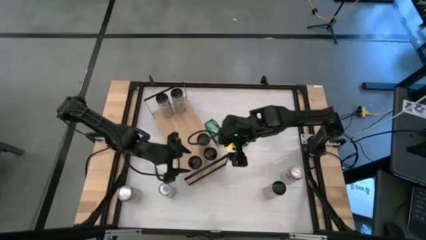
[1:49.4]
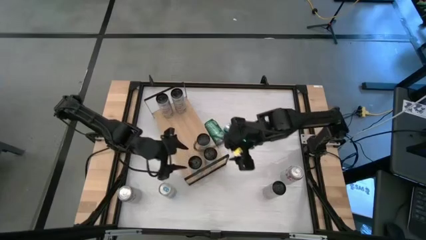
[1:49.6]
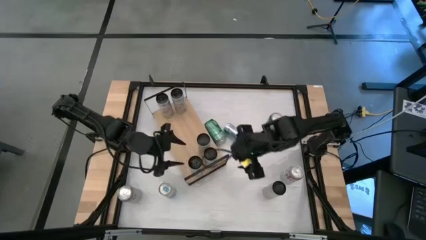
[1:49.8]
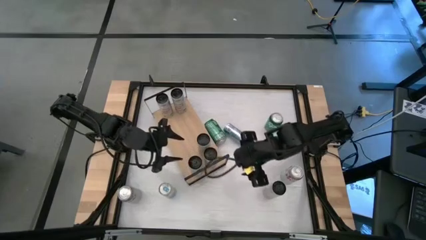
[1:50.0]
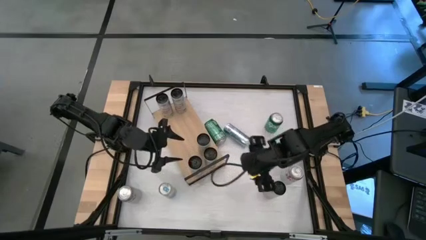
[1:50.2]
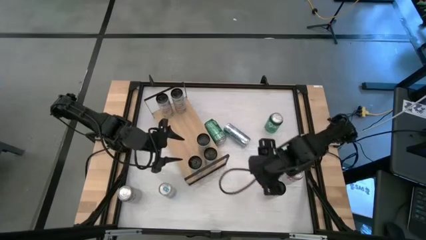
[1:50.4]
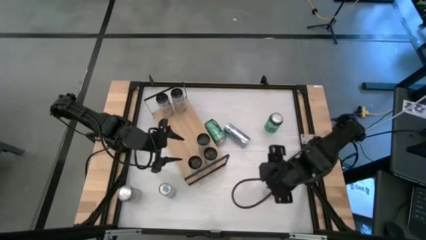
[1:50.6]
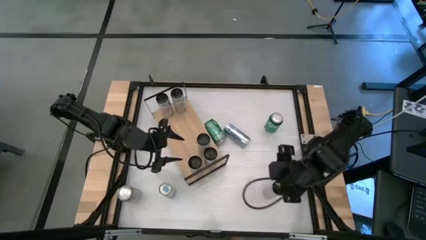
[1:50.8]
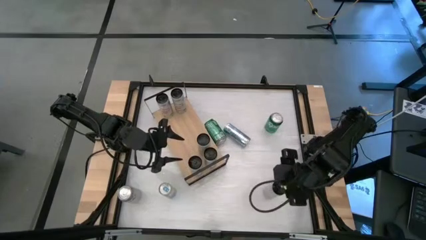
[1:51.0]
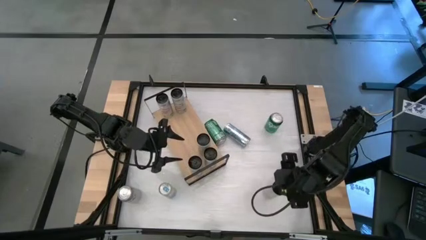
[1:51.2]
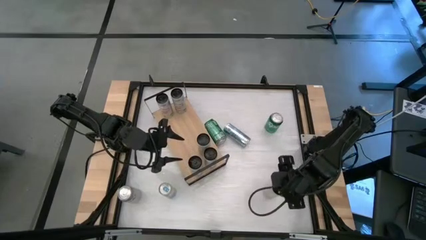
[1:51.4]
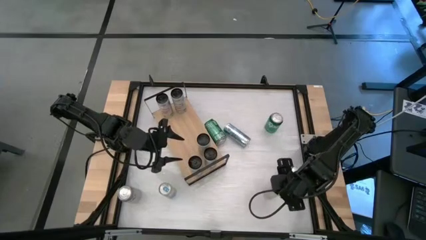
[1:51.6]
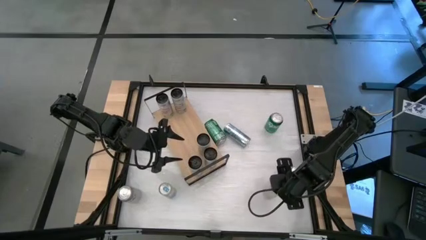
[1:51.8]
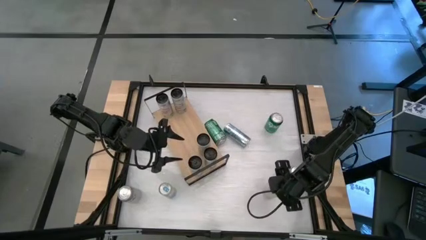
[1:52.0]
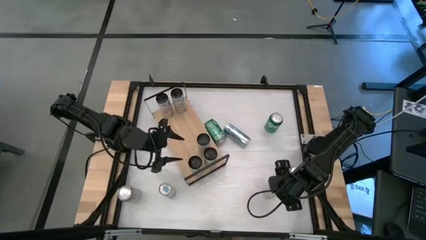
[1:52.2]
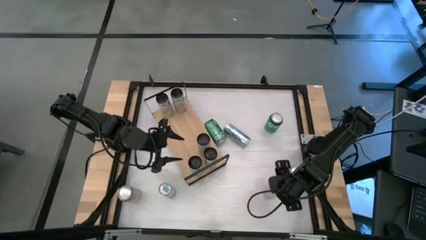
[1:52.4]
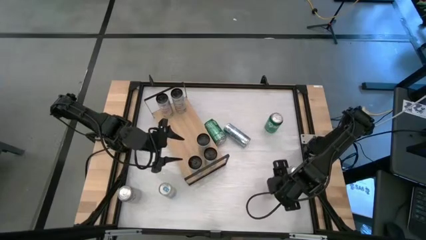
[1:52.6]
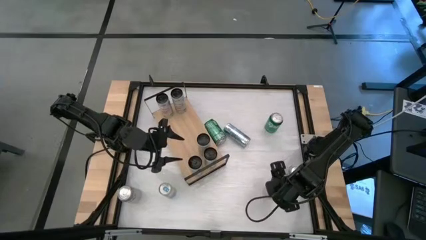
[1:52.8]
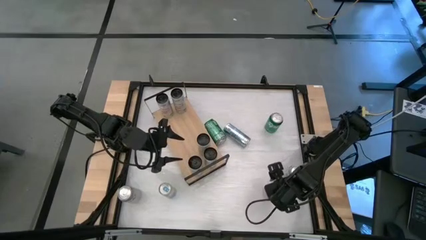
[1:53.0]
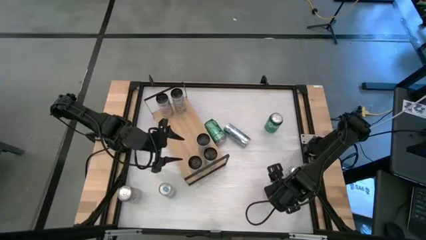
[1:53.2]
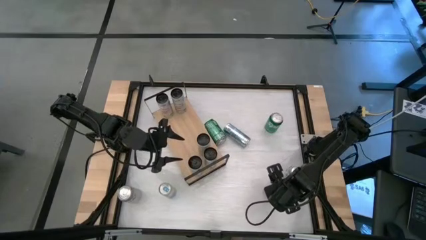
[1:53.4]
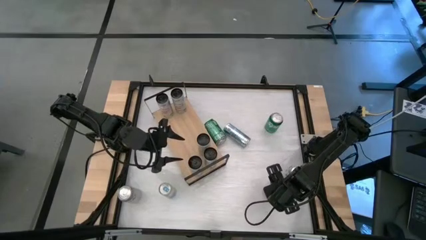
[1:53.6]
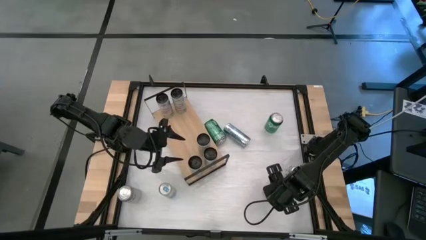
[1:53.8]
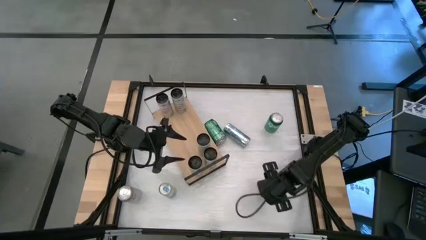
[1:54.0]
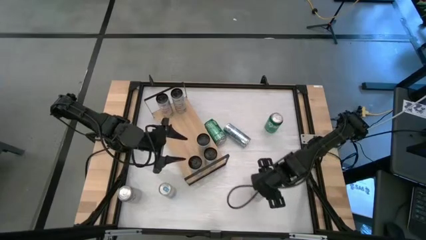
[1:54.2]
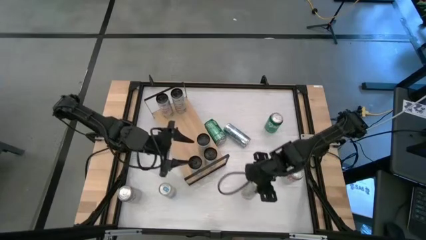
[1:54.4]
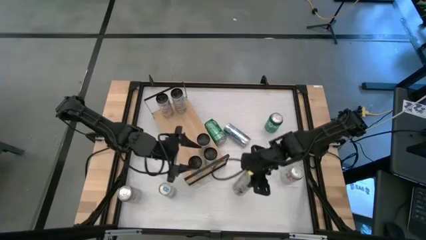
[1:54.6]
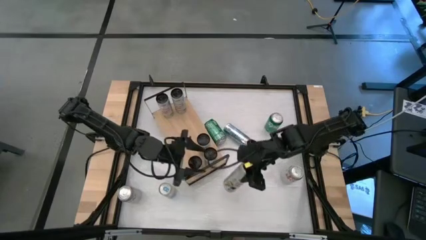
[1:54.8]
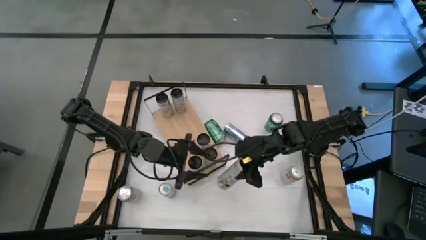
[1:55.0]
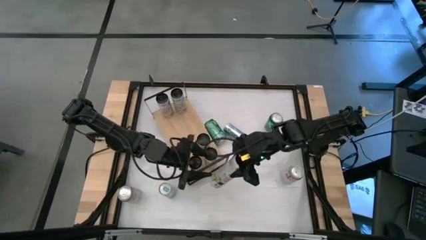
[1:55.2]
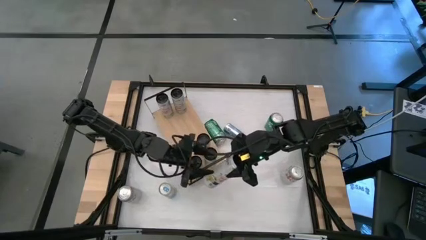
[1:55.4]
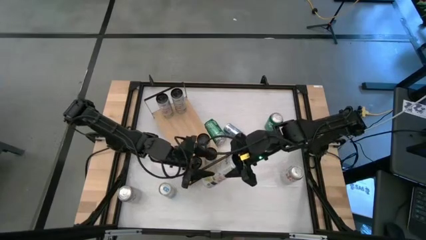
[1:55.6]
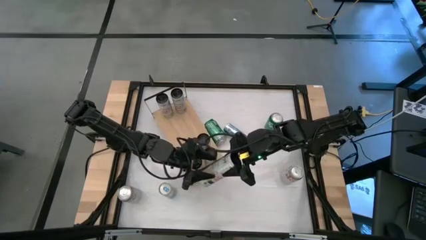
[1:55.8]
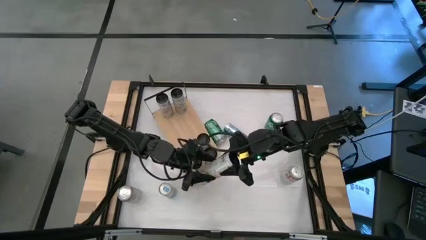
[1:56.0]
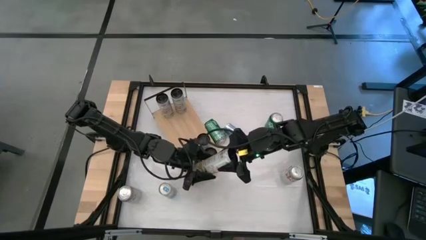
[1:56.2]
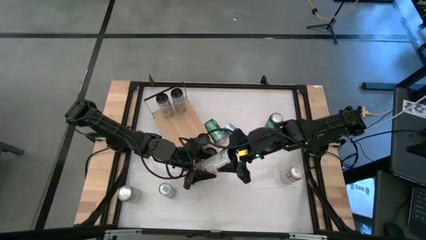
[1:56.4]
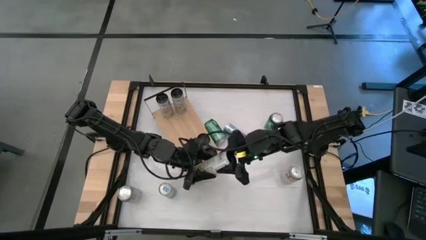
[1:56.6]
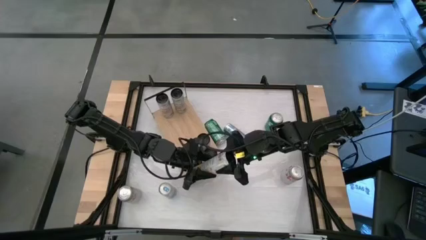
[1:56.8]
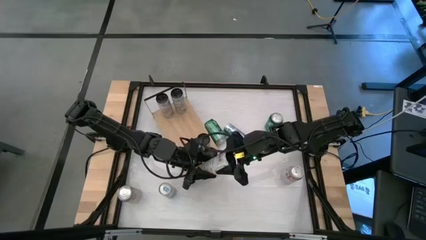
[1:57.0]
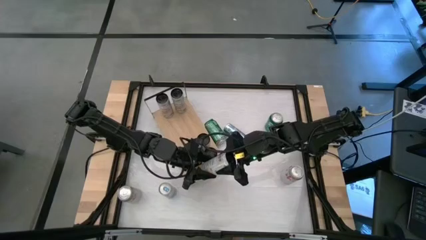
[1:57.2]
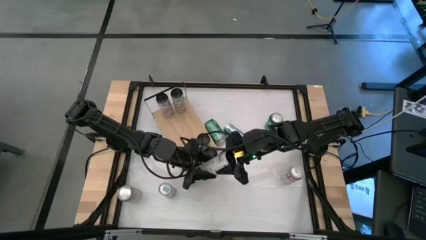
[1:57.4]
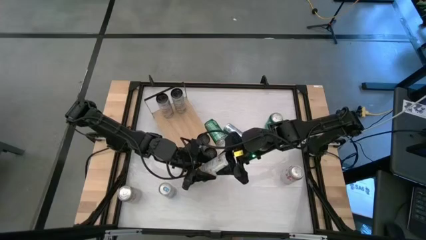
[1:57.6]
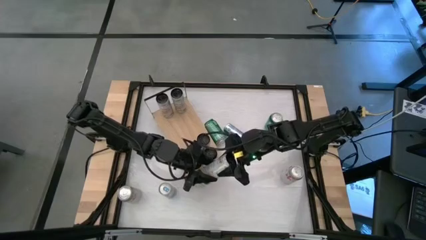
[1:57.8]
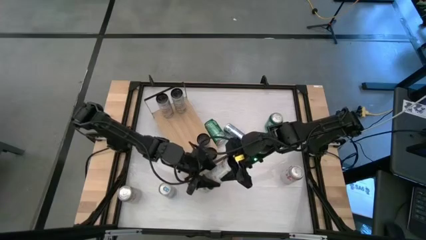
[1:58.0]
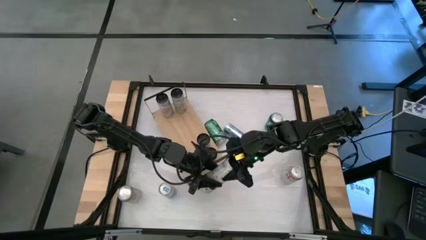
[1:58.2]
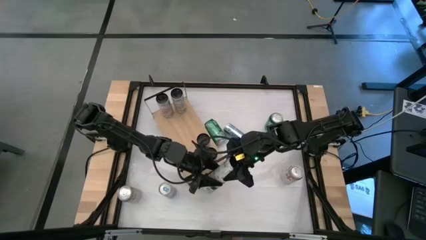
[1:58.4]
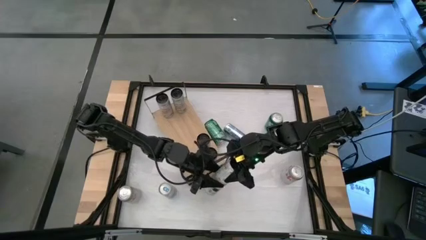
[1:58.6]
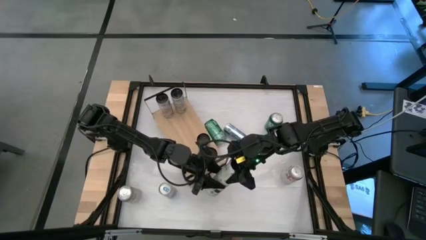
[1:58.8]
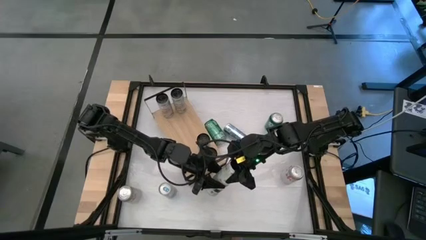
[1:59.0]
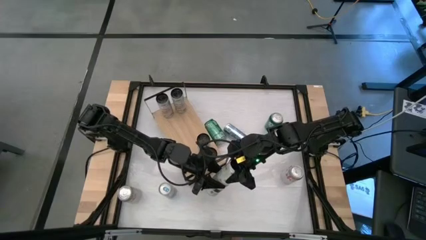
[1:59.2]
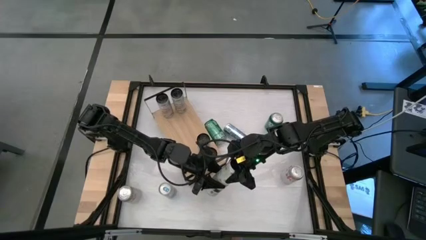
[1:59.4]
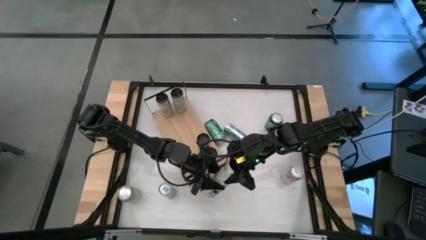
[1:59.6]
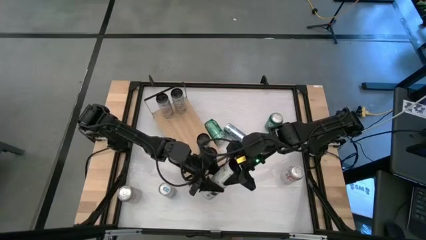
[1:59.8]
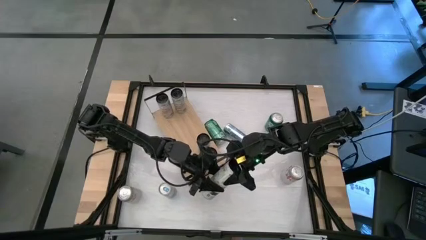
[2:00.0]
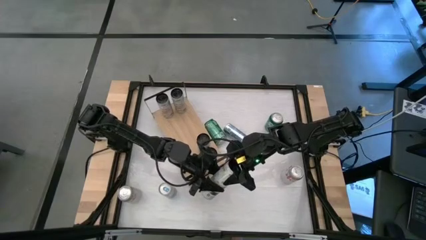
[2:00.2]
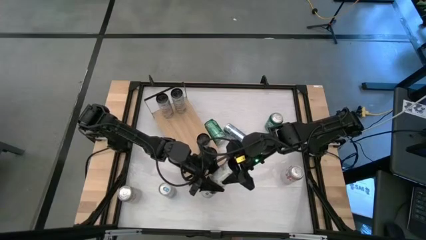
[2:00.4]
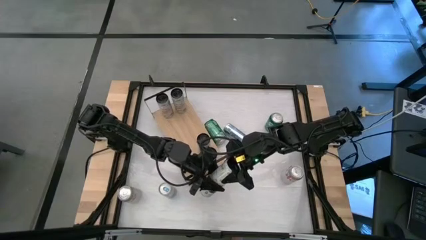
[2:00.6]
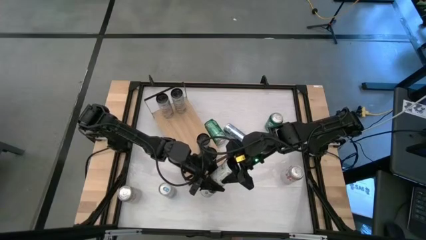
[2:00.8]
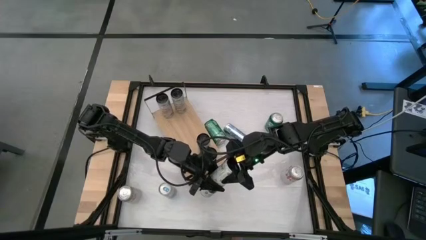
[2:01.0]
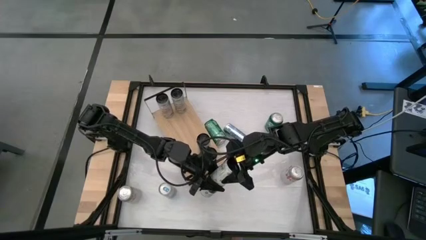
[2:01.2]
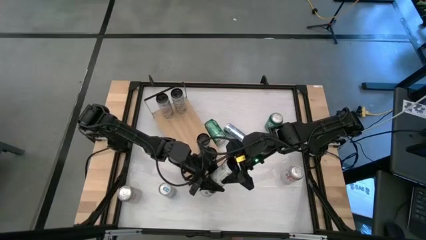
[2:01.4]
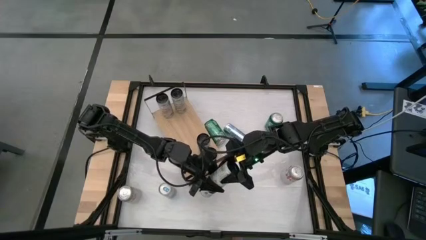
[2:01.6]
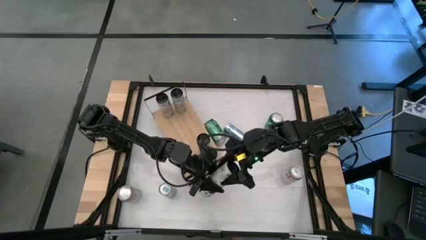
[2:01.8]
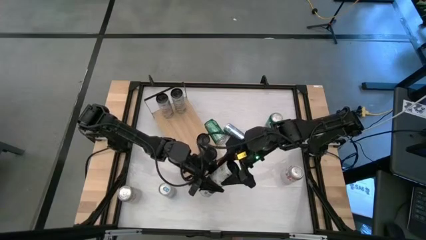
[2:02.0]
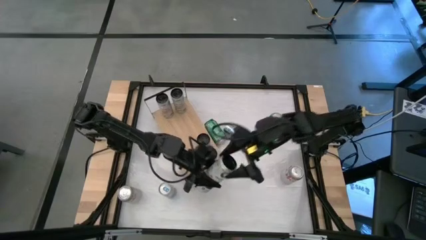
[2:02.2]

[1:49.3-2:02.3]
Task: Place canned beverage on shelf
Put the white yellow soda can on the shelf aligned with the other white yellow soda cans
